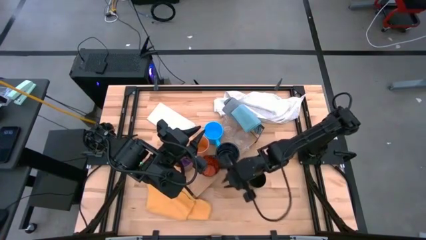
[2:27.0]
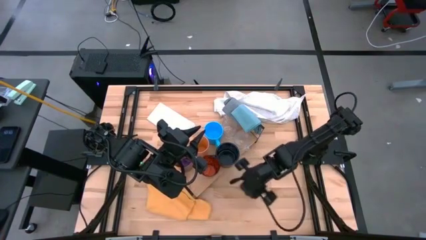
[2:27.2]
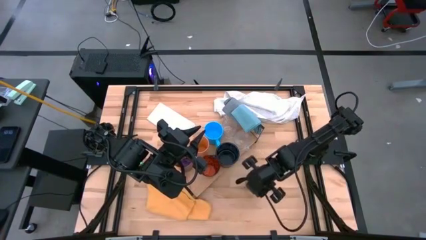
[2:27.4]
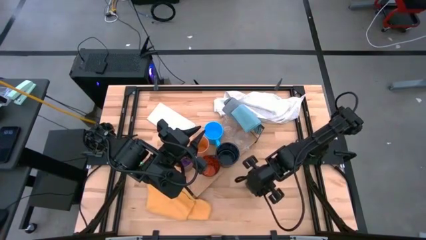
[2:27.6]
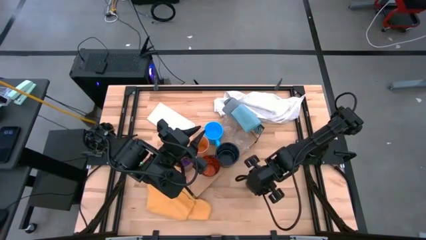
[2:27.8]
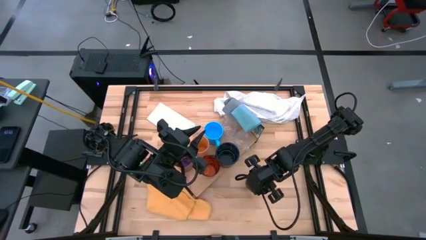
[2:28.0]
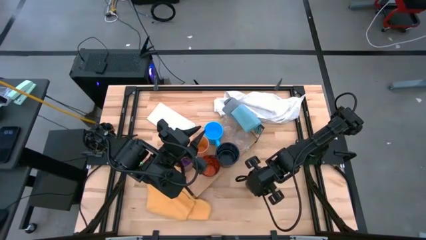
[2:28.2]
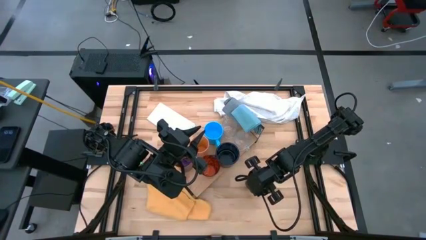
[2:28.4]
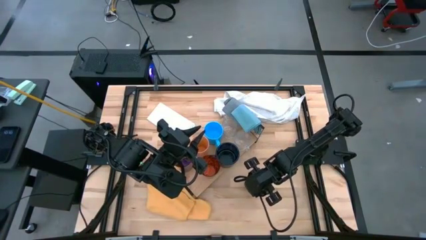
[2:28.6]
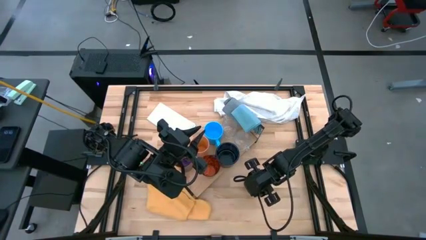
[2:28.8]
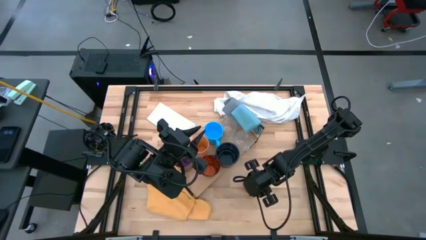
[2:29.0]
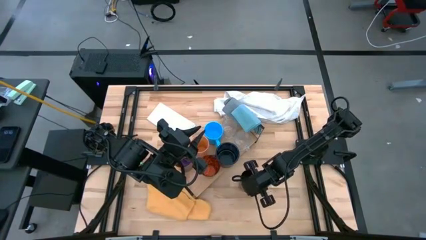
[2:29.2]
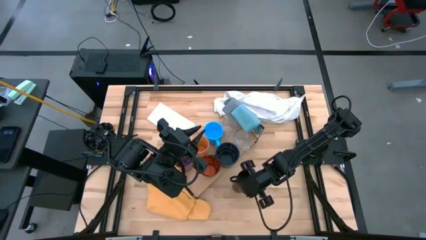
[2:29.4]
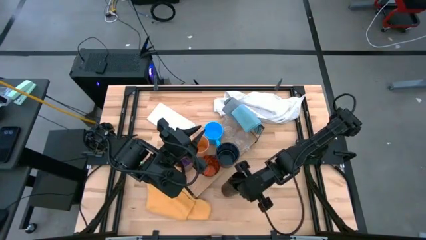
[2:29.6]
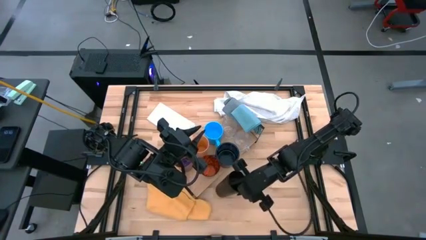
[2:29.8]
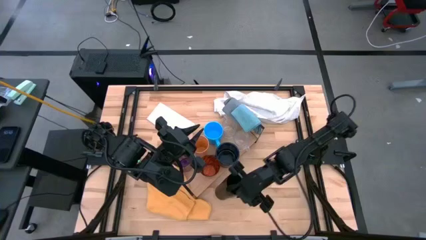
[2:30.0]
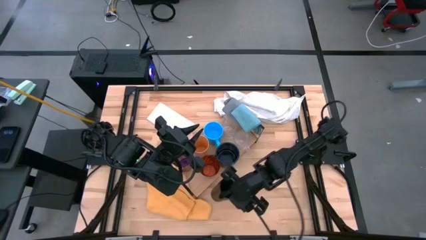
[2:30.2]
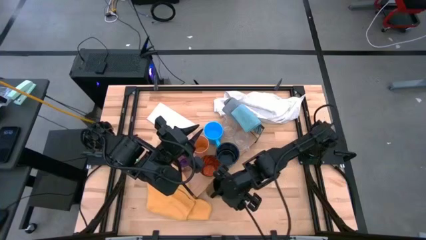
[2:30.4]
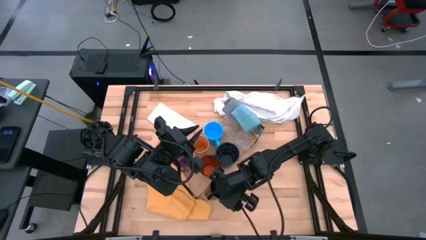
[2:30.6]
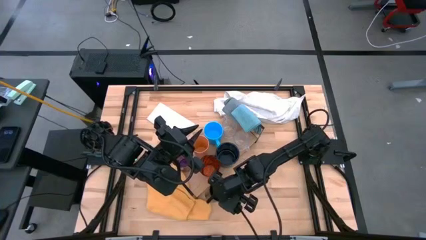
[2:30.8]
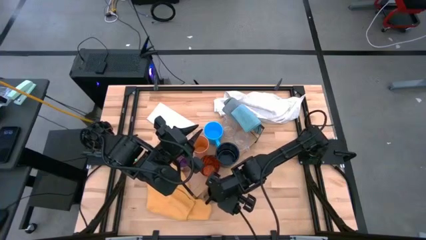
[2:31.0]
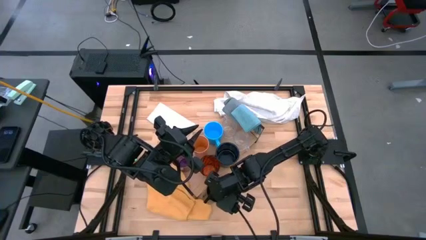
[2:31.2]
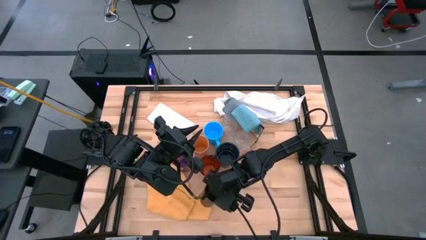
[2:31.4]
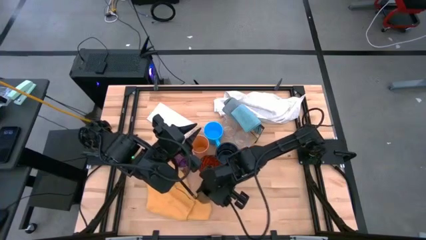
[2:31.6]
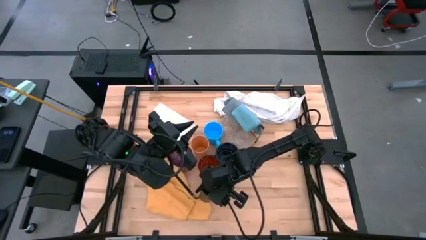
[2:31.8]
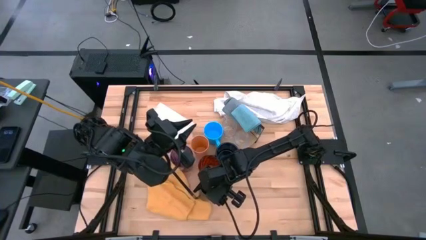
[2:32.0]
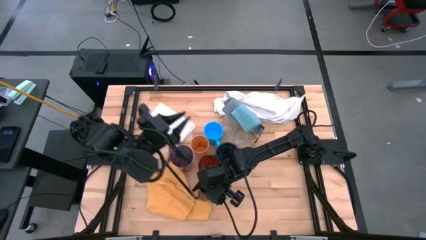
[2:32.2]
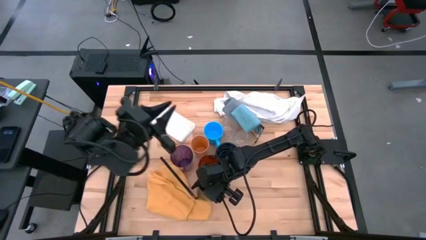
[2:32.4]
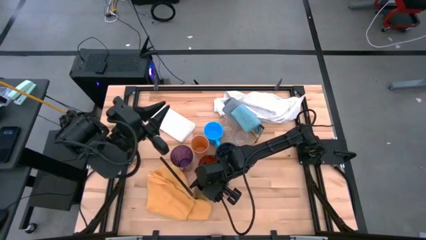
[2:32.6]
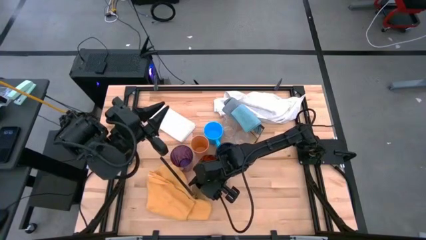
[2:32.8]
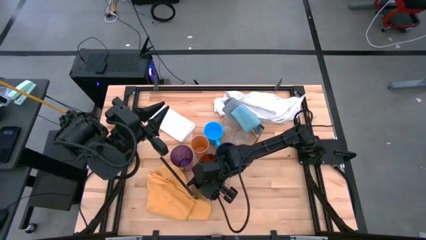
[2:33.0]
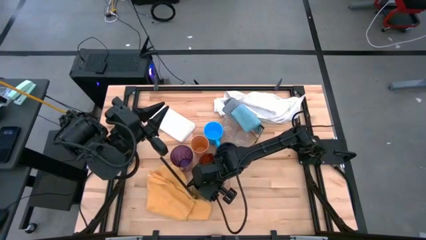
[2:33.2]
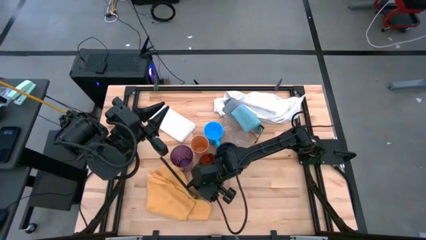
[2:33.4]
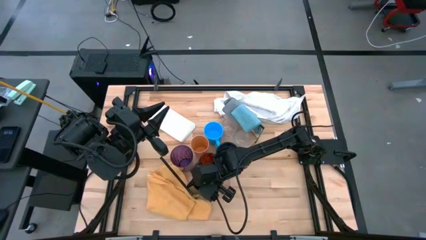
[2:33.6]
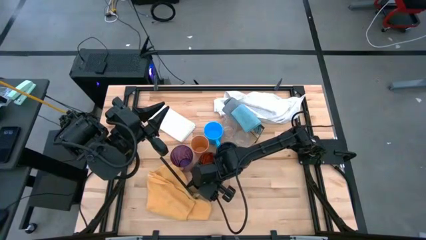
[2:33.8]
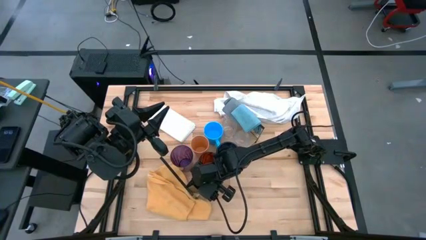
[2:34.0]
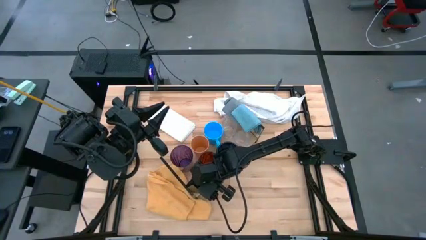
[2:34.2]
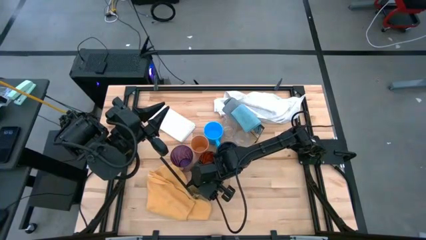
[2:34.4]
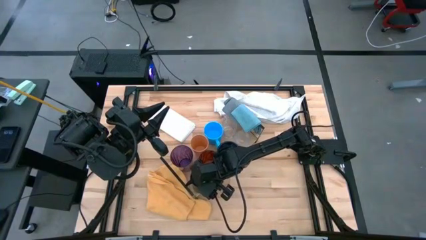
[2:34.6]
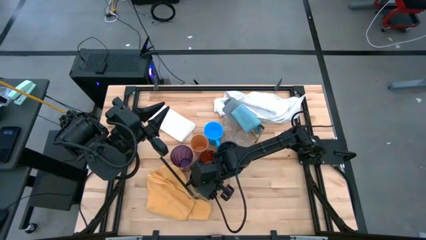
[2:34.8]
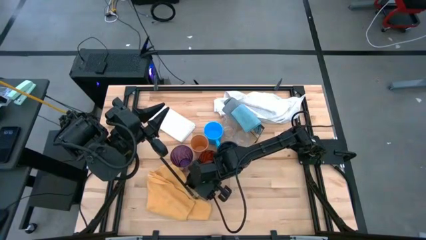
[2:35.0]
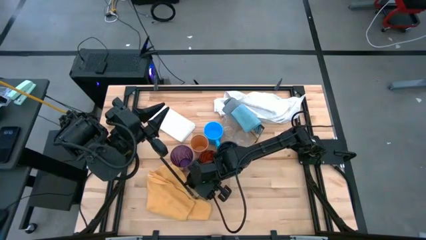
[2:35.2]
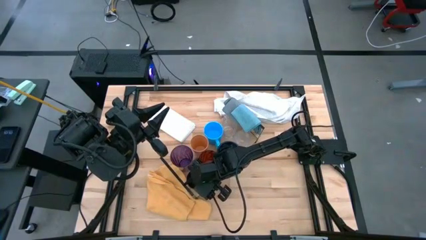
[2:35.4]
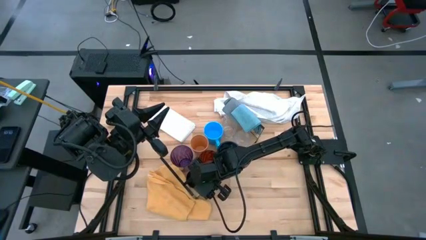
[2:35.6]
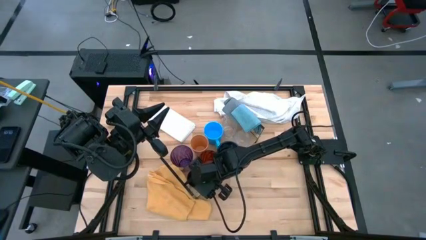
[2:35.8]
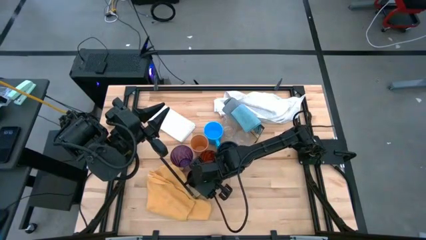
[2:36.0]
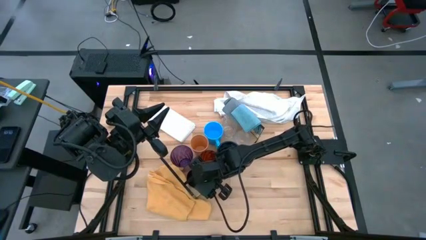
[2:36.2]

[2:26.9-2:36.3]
Task: Stack small to large cups/mugs on shelf
Put the black cup on the shelf

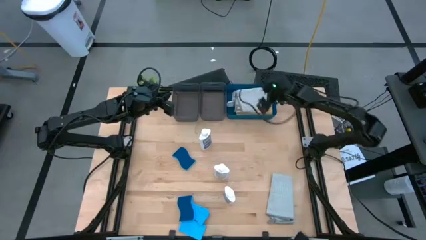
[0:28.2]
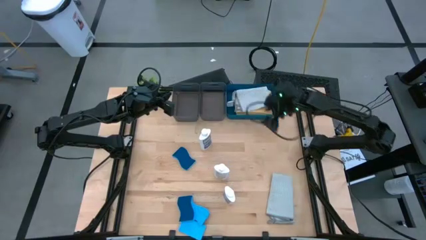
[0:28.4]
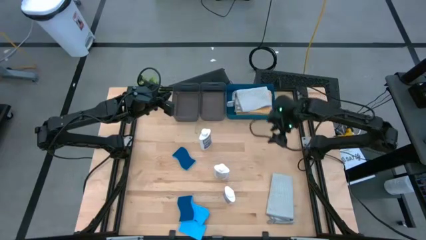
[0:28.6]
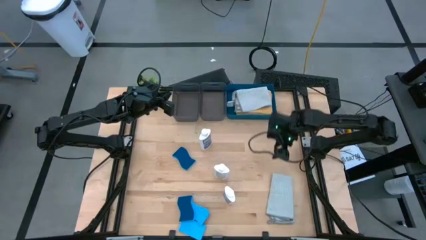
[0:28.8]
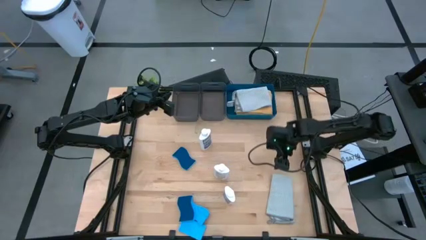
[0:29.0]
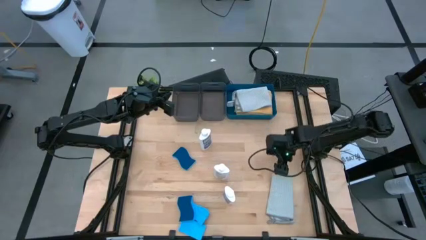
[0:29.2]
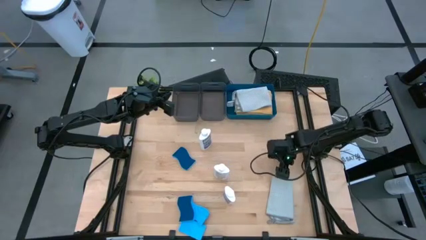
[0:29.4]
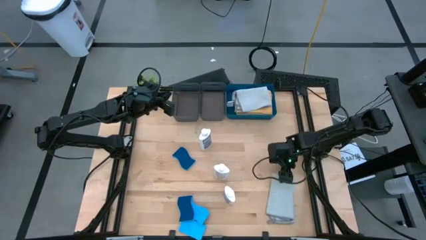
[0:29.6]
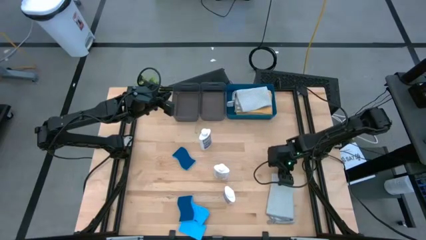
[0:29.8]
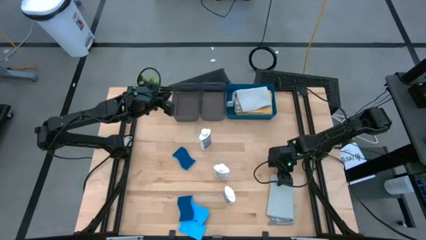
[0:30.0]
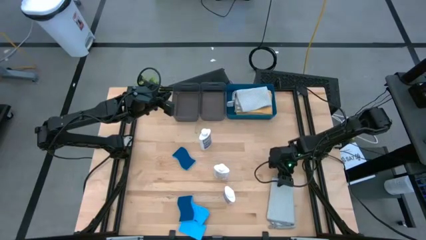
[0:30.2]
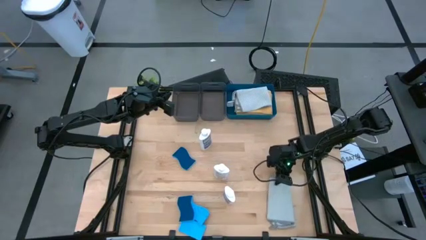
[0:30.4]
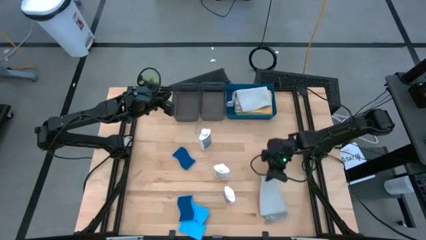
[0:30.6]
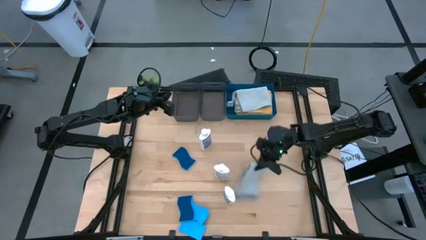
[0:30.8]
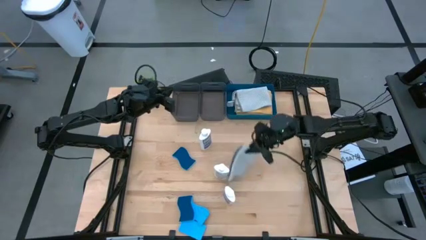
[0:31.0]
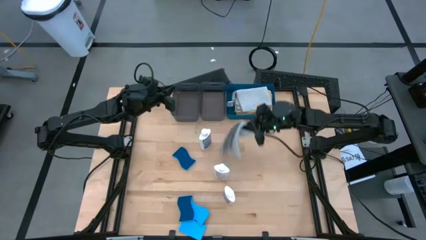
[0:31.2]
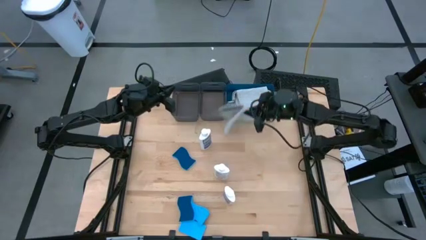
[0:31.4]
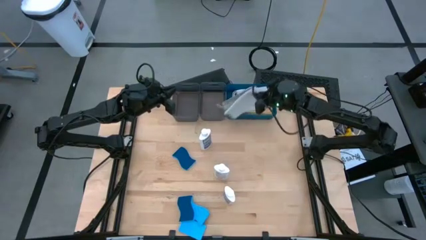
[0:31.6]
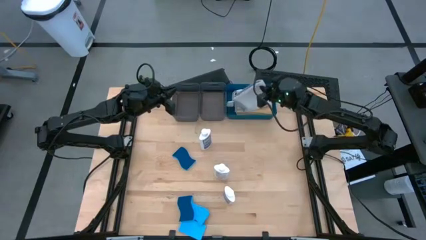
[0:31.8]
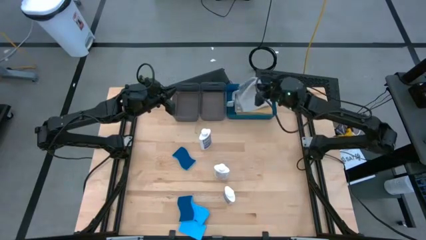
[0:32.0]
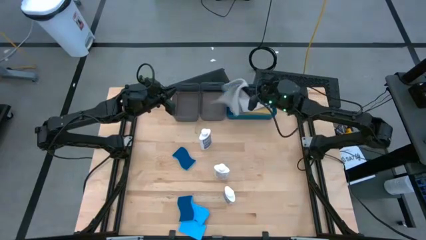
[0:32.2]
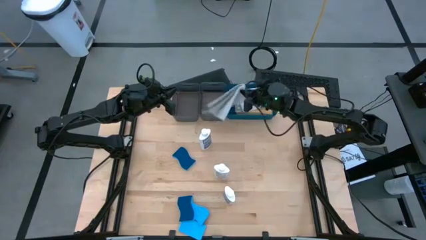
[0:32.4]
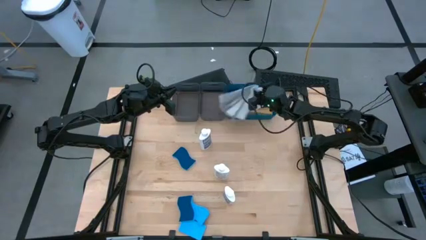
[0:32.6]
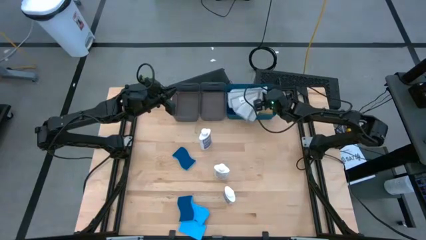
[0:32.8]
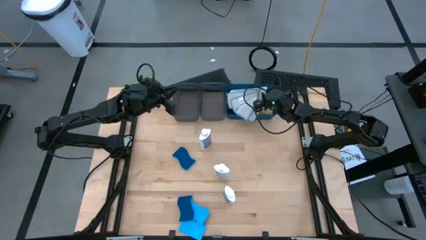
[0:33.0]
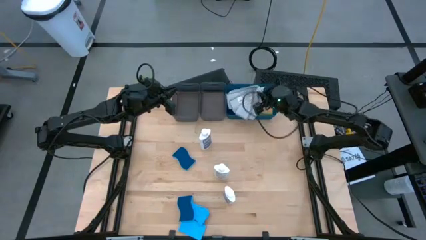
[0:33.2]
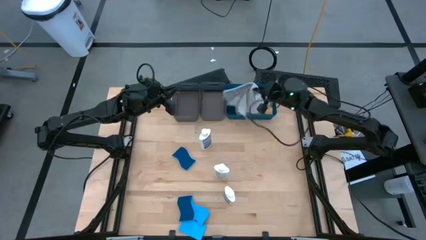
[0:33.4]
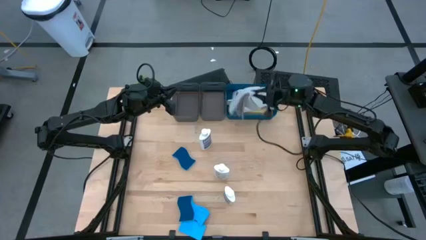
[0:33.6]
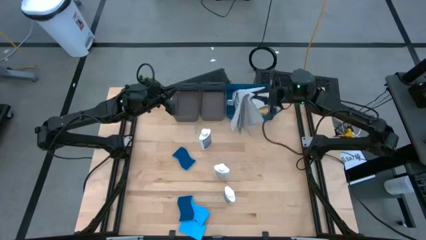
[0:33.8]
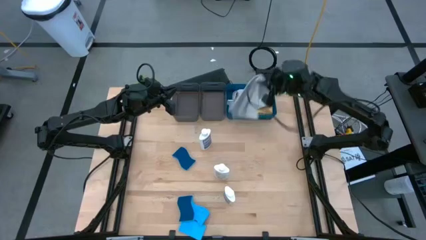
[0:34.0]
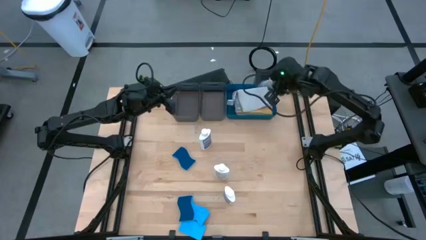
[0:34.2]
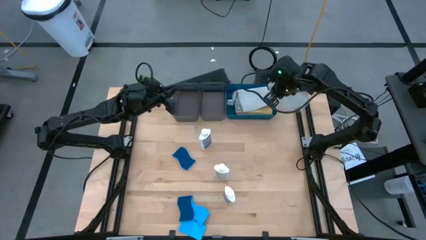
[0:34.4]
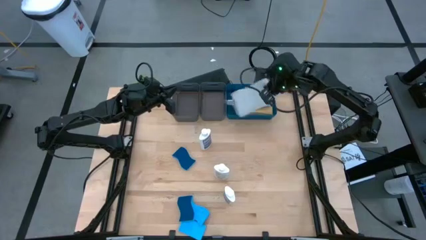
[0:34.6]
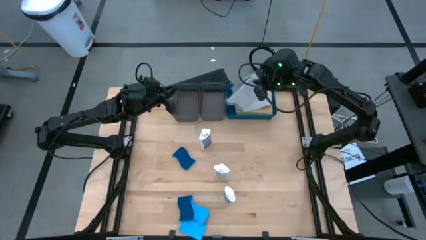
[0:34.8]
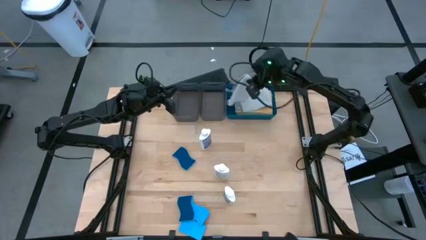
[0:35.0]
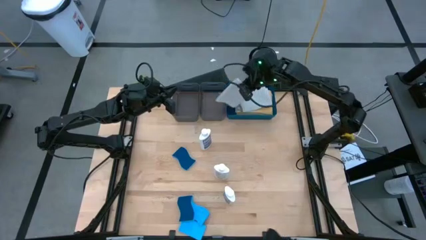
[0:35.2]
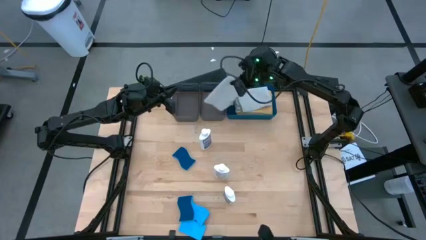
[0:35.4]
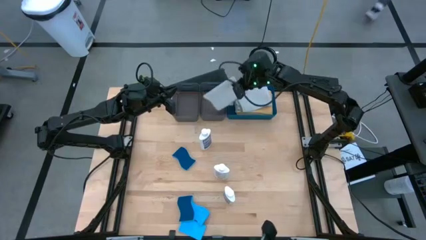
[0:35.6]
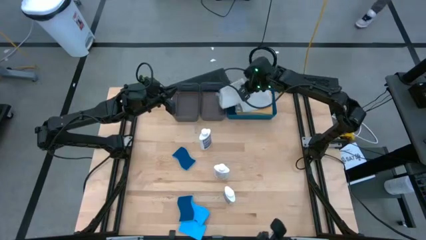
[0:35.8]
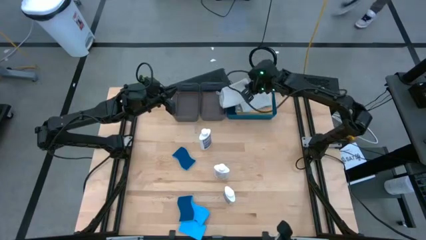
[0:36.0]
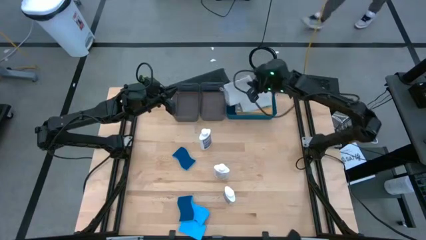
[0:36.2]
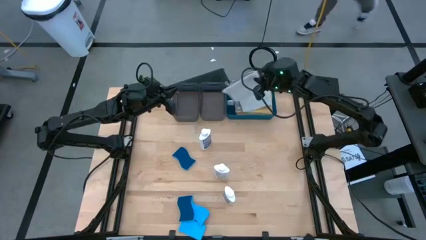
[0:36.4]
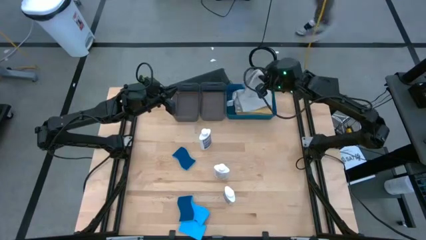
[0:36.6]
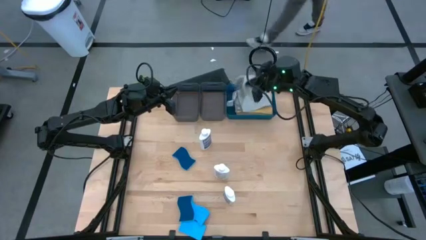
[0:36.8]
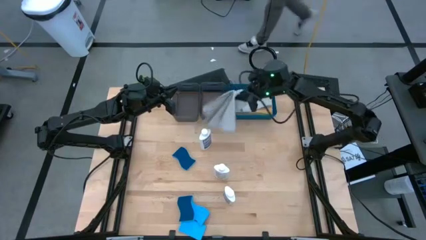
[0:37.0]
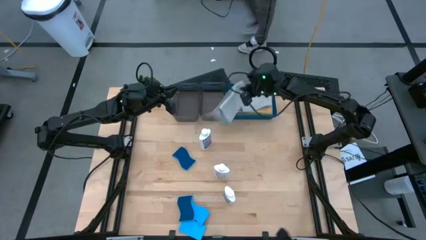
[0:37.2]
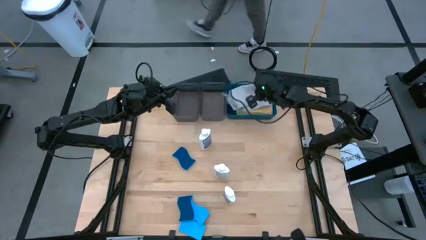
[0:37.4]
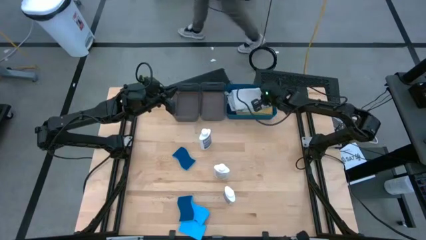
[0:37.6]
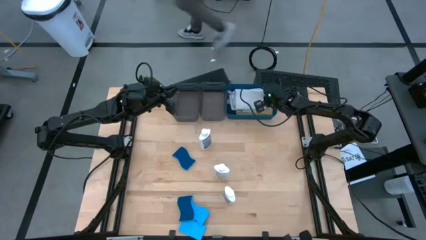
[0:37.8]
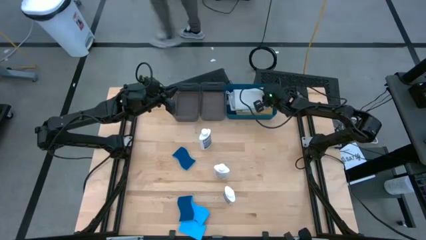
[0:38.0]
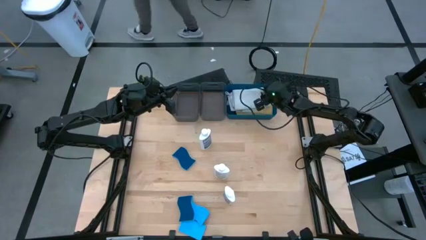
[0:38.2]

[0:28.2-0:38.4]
Task: Pick & Place Kitchen Items
Put the gray towel into the blue bin
